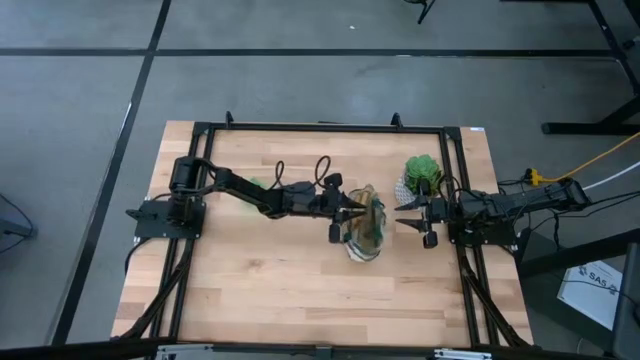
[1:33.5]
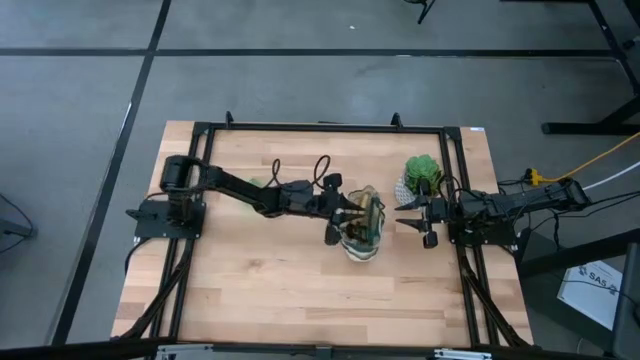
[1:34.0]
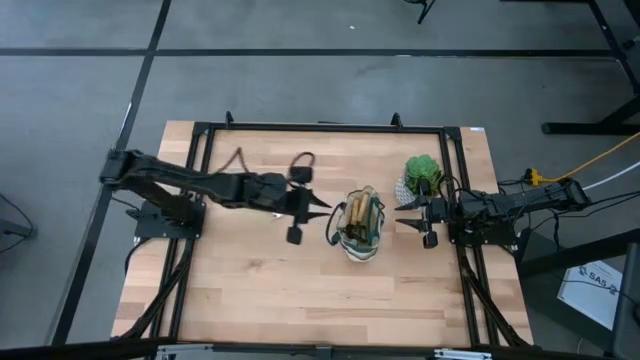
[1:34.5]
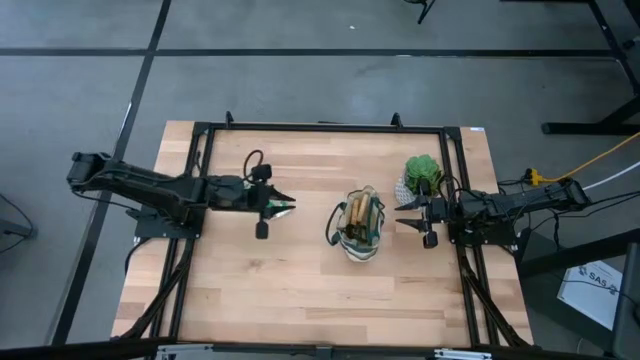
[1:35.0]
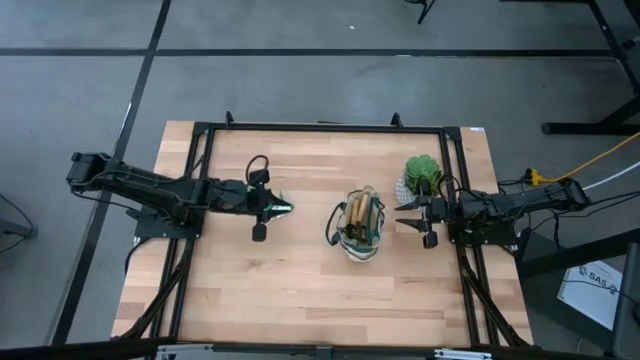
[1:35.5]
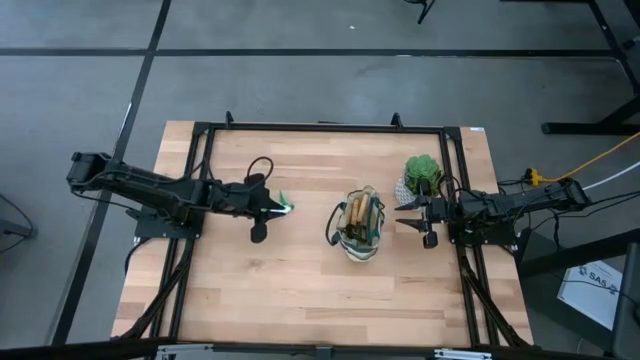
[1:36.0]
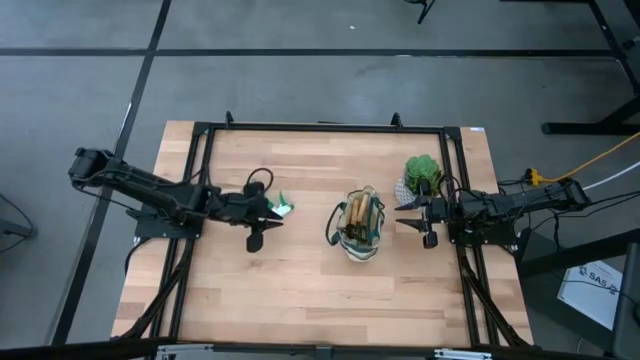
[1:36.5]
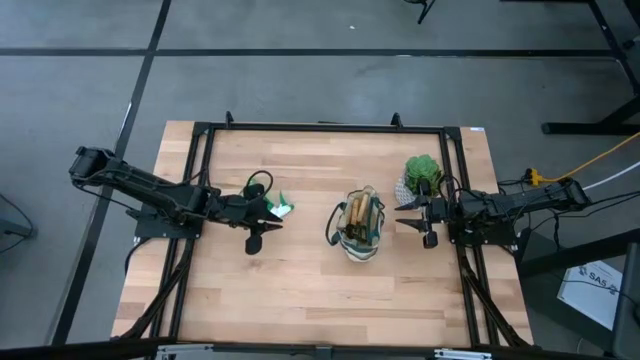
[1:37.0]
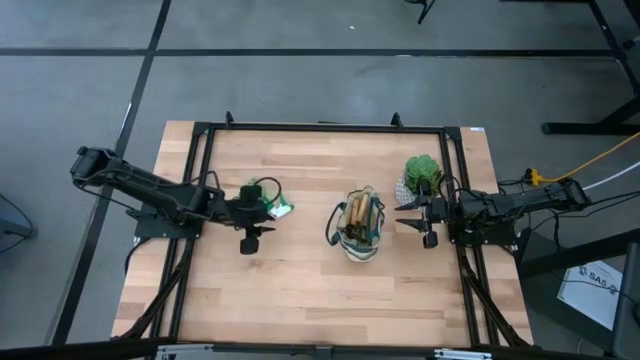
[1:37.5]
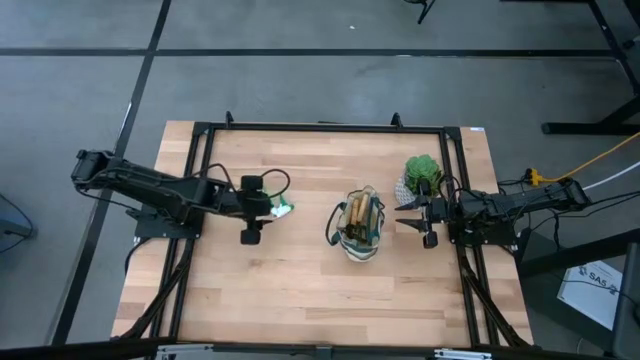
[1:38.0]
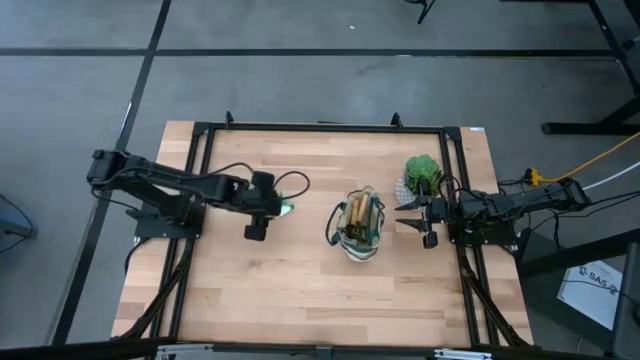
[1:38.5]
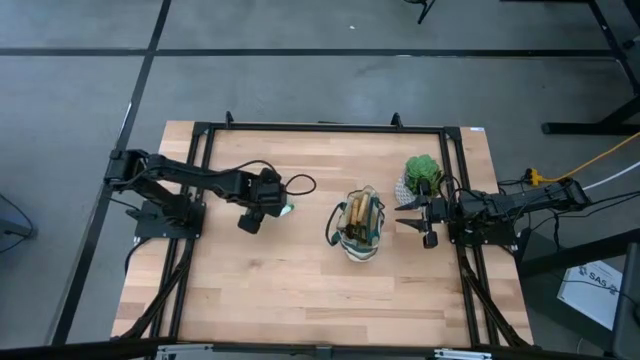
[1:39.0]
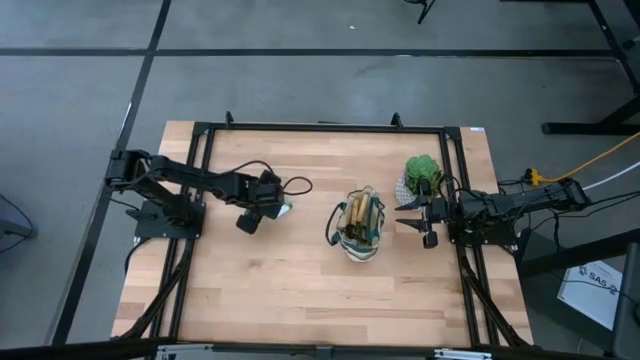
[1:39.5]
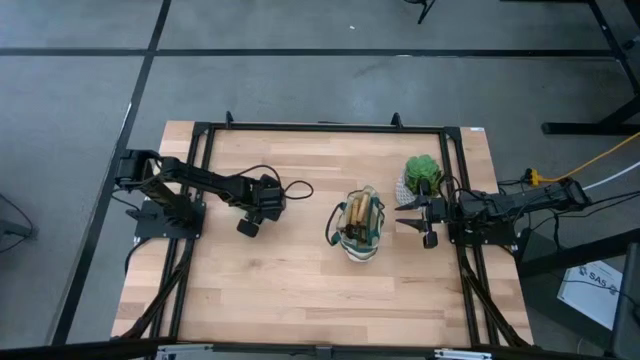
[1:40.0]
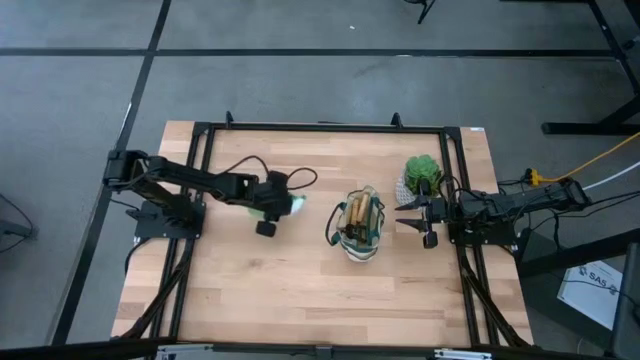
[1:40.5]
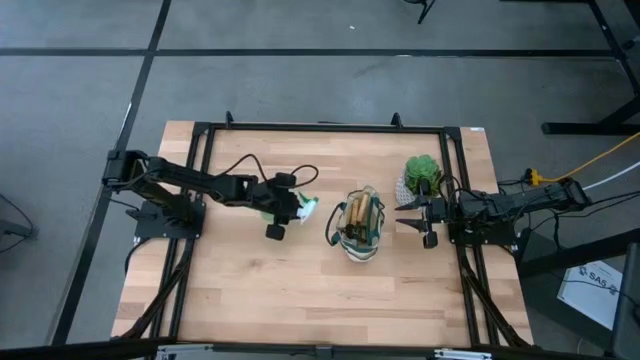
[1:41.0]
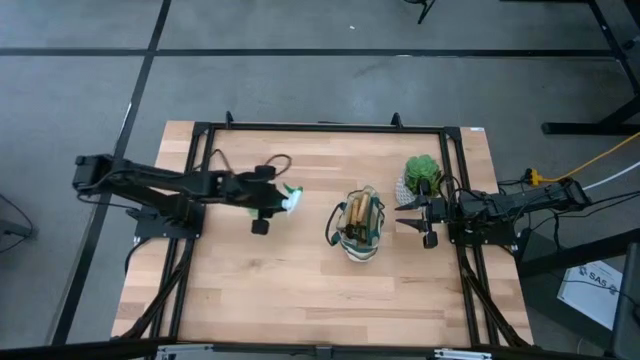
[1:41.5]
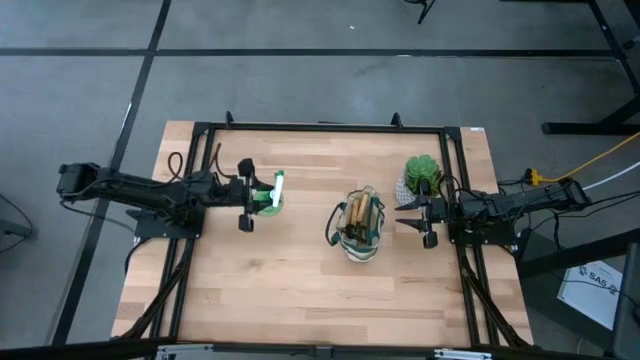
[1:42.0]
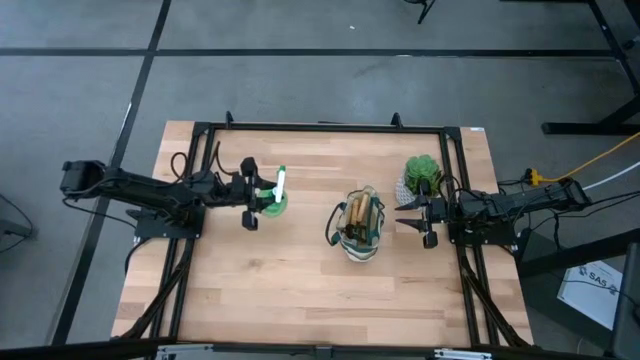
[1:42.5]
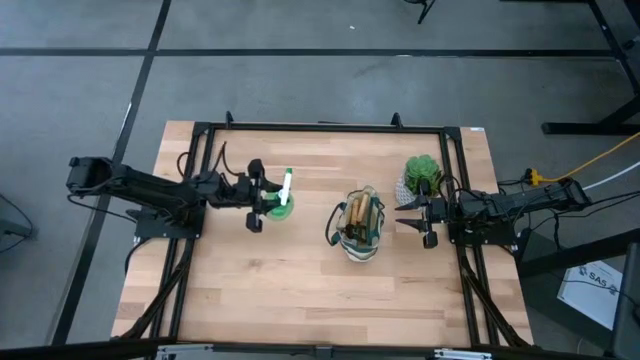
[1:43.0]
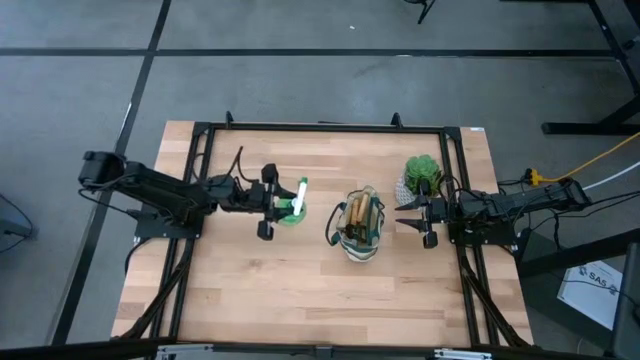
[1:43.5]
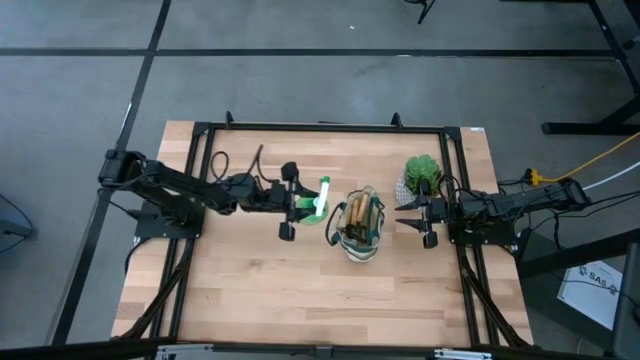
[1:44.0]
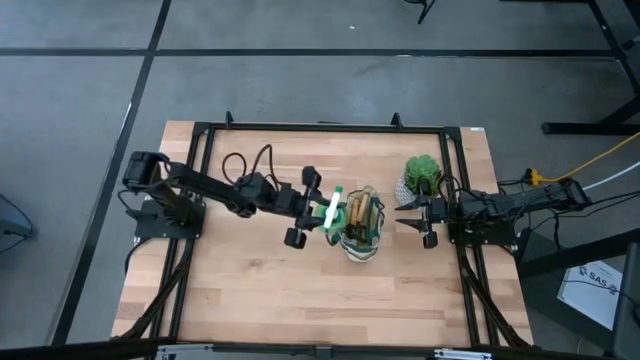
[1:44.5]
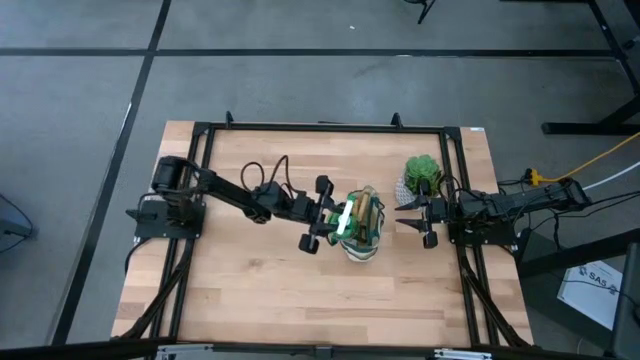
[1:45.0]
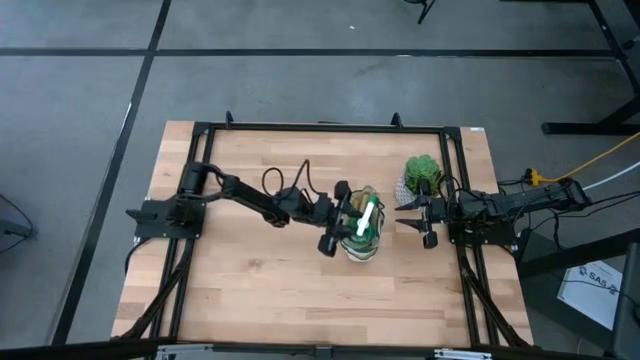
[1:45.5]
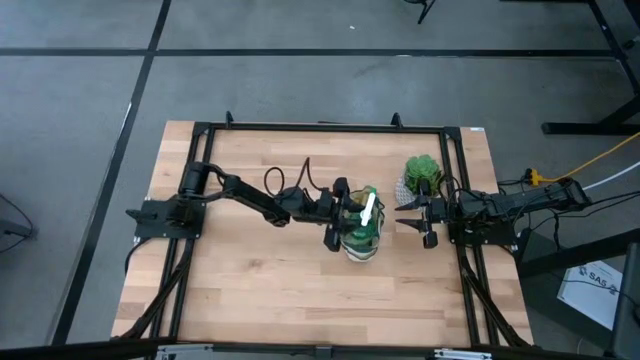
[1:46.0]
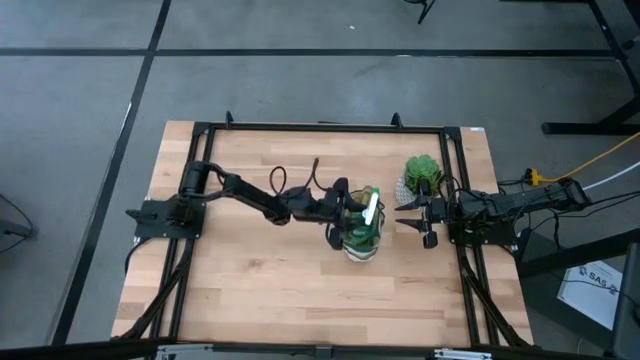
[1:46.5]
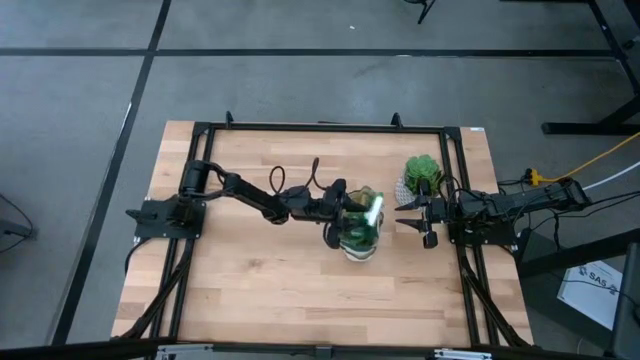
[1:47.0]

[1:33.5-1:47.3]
Task: Pick & Place Garden tools in Gardening bag
Put the green spray bottle into the white gardening bag

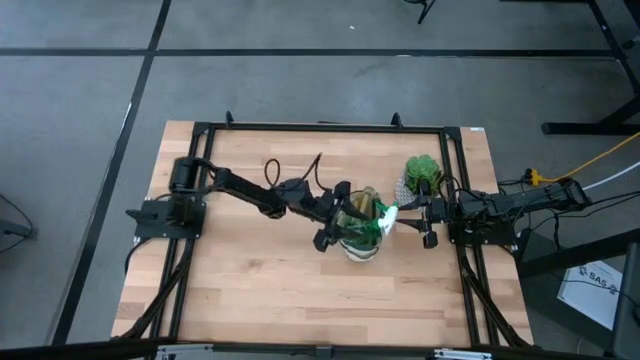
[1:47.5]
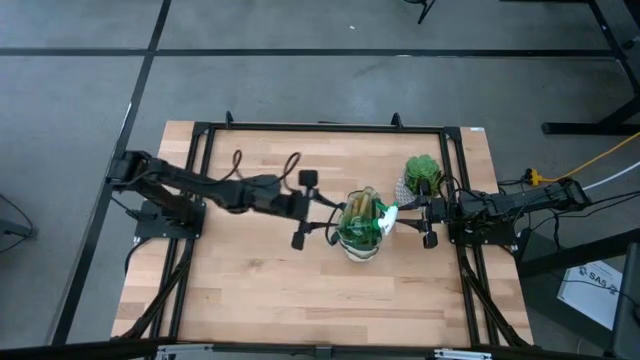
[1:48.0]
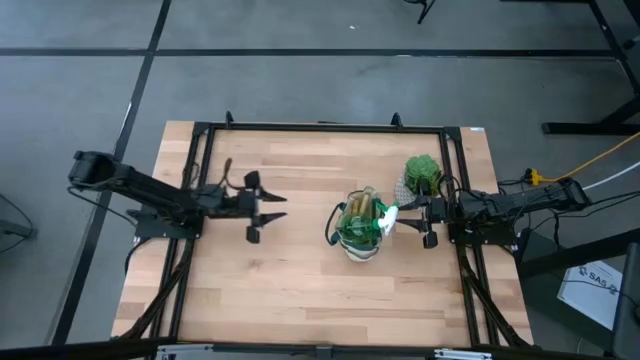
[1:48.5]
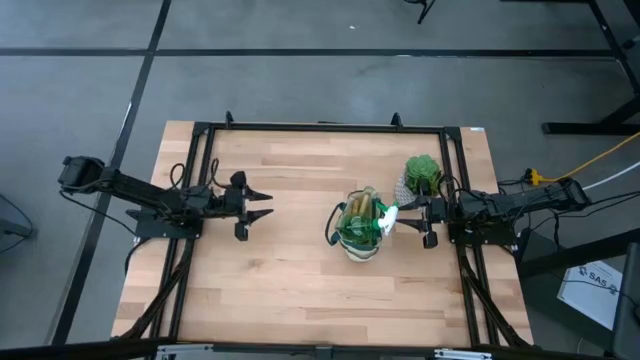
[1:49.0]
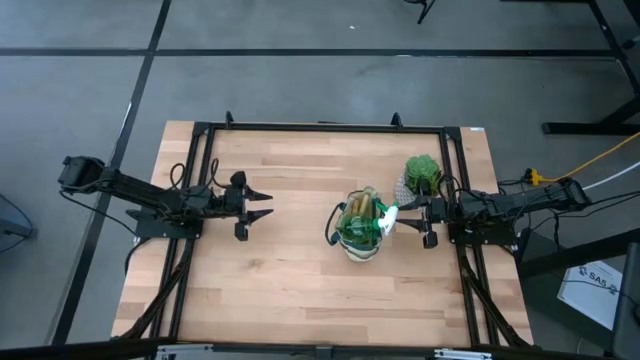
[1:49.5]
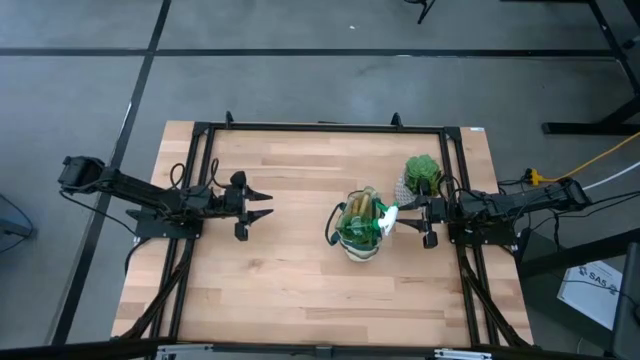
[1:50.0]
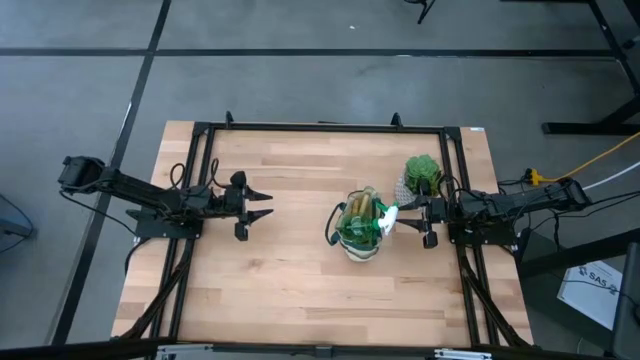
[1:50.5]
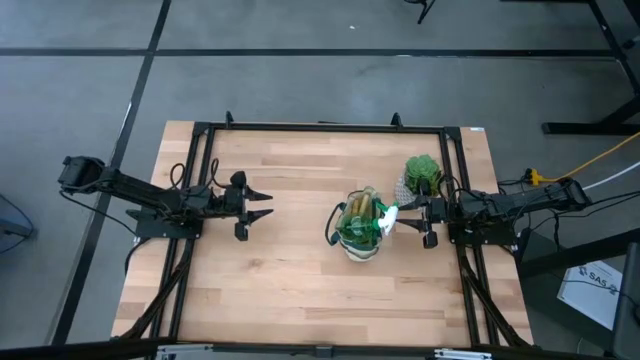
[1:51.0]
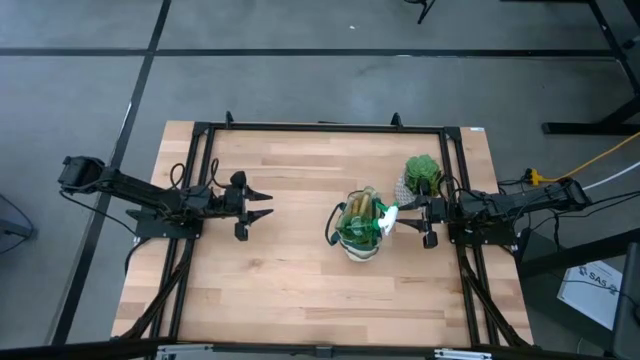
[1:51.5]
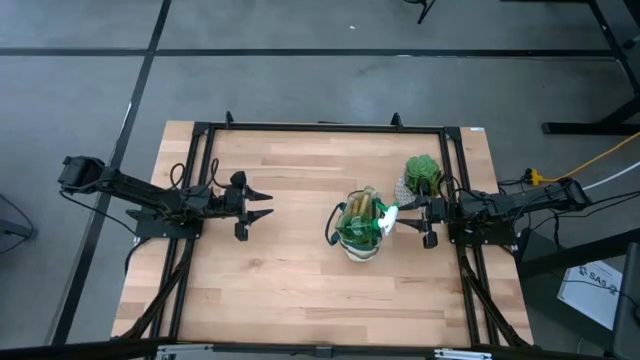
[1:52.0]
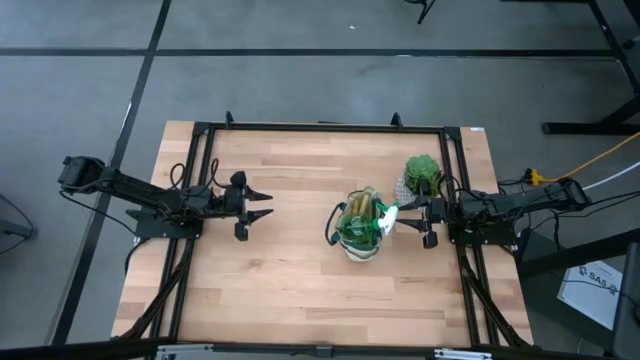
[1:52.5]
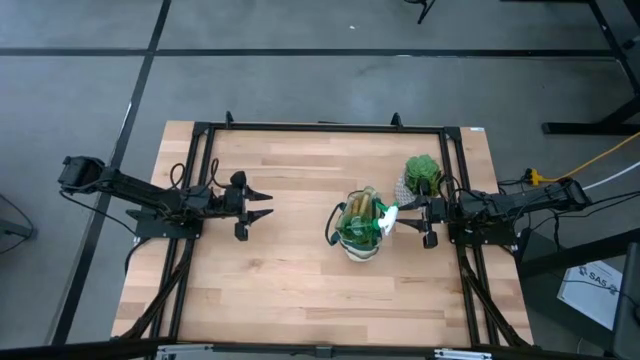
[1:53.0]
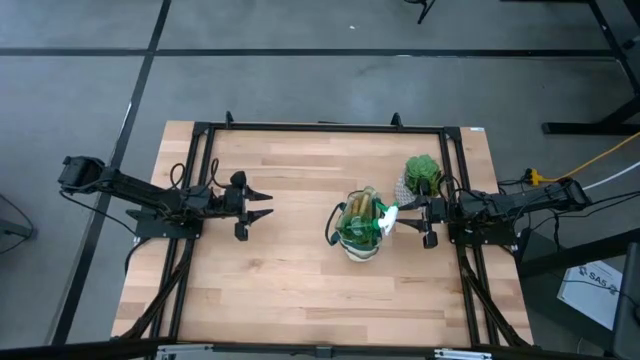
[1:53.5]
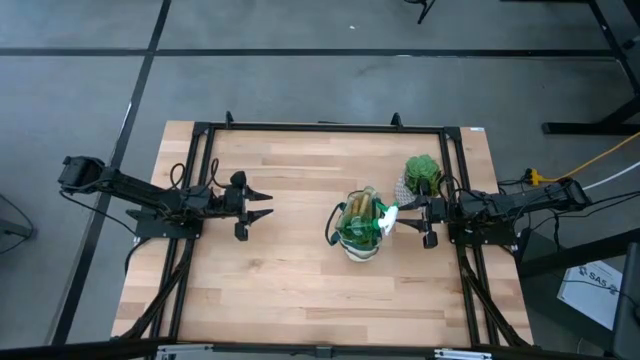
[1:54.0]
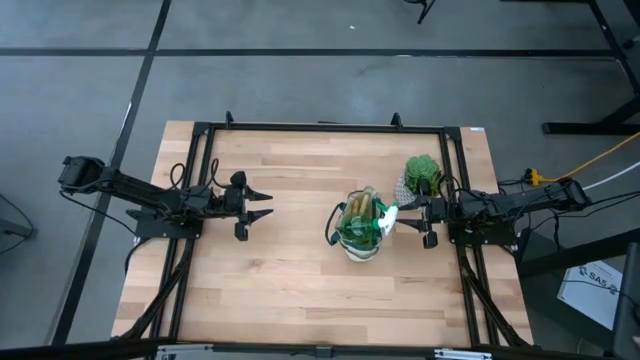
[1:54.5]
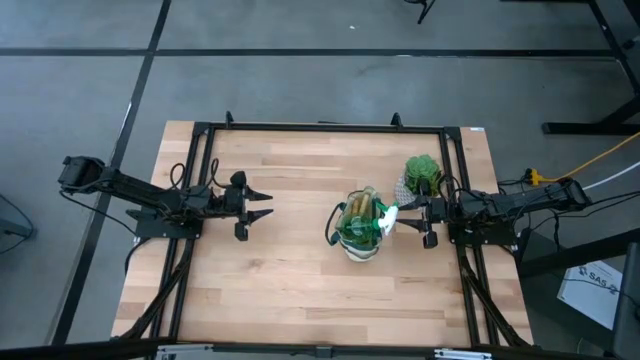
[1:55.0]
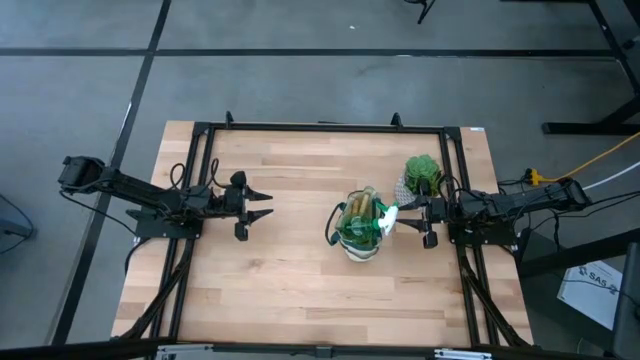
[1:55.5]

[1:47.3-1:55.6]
Return to Home Position
